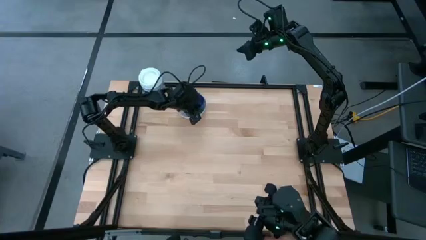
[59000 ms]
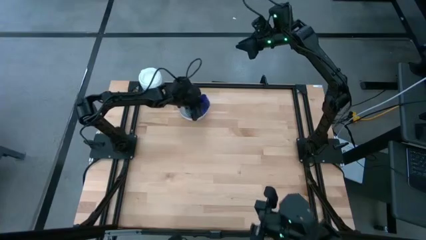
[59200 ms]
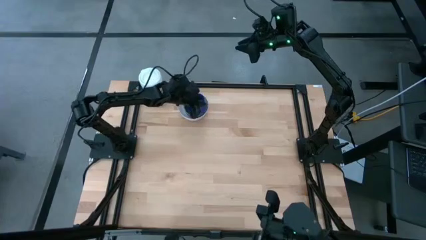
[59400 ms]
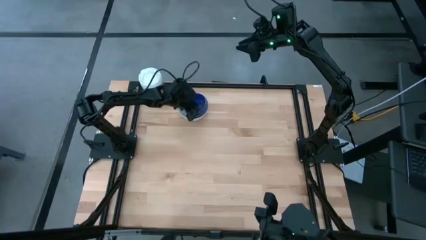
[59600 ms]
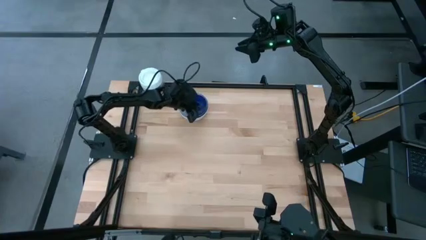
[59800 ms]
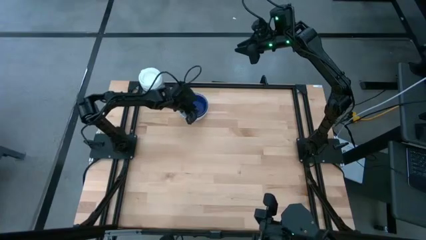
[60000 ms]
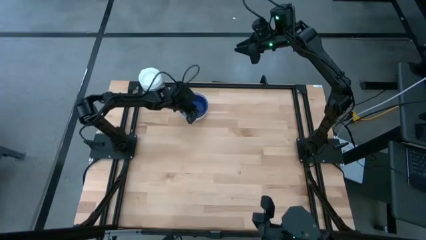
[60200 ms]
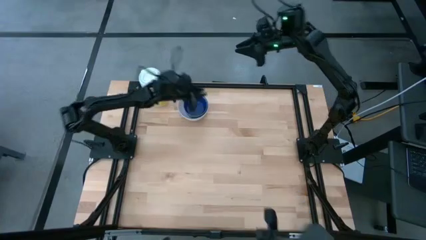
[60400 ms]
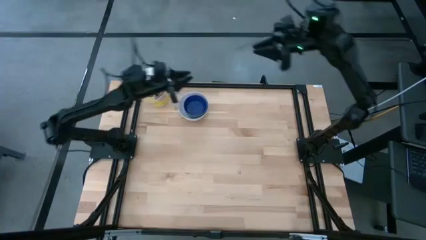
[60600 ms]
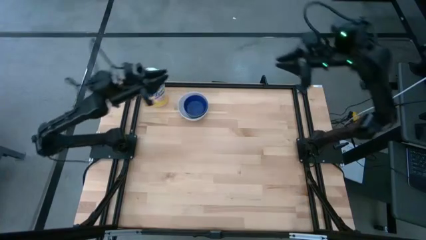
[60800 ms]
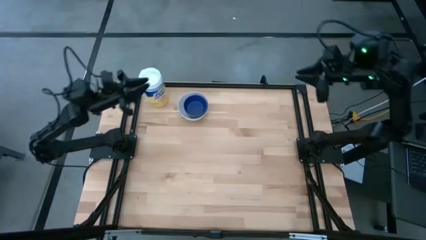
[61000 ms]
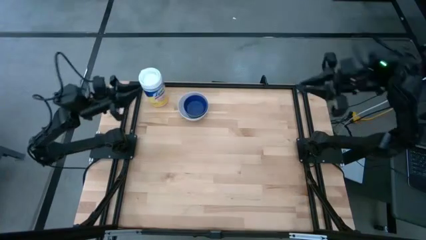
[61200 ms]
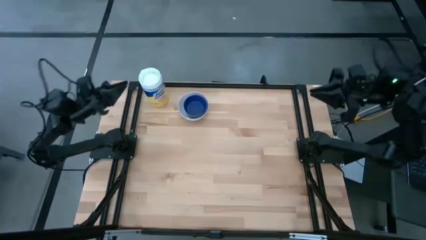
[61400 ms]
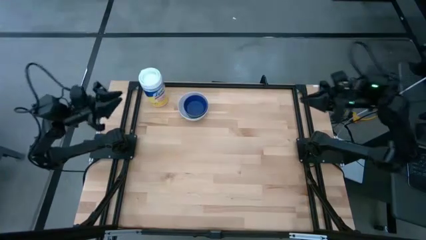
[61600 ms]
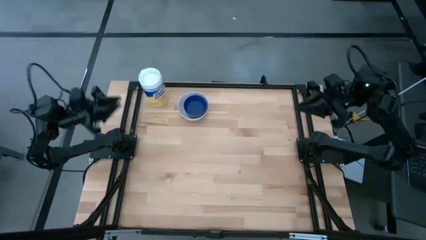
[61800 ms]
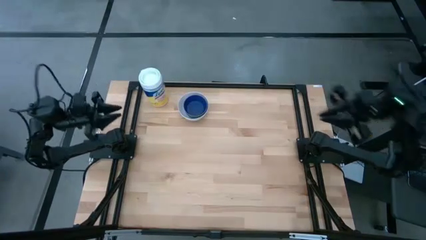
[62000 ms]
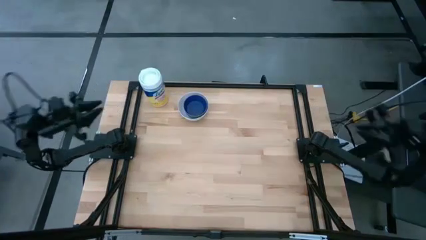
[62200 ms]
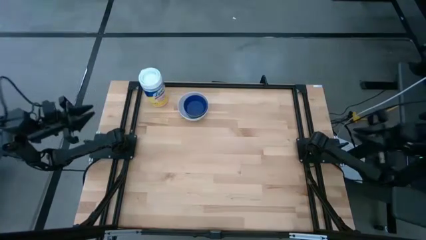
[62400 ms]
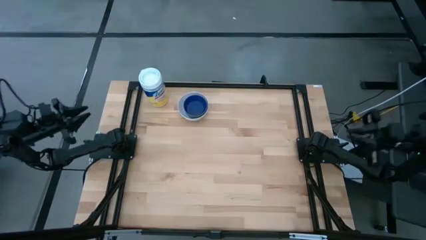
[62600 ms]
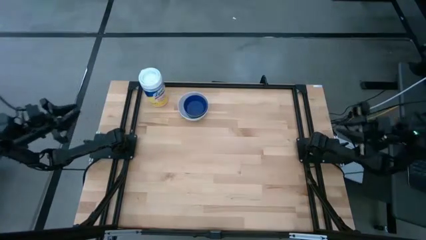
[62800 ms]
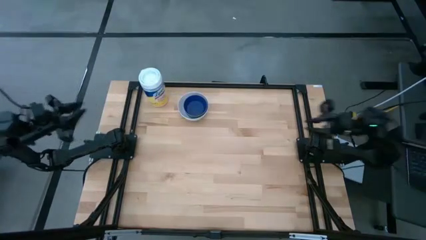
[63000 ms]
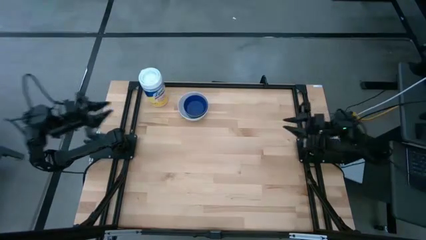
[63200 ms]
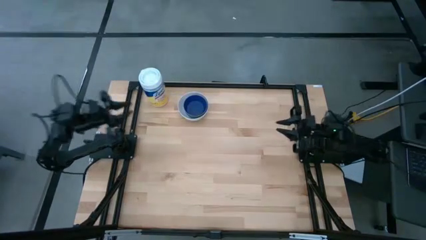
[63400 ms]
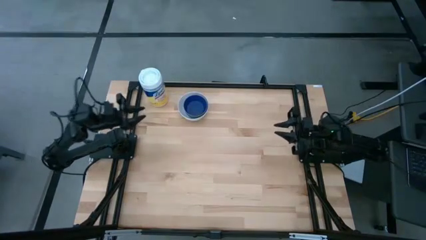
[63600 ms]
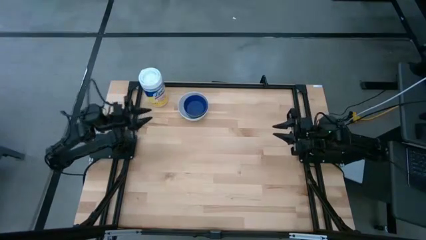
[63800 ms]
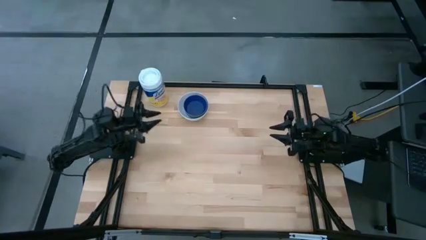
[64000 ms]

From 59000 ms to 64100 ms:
Return to Home Position

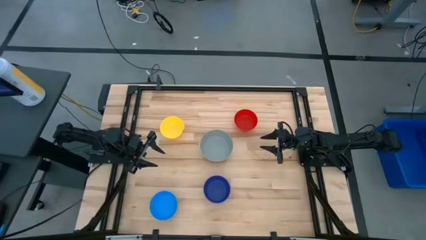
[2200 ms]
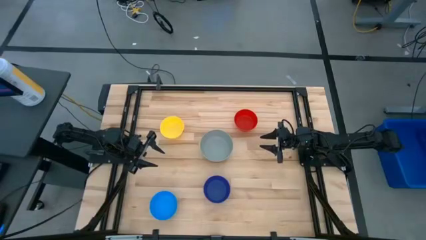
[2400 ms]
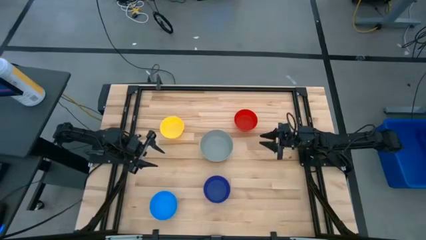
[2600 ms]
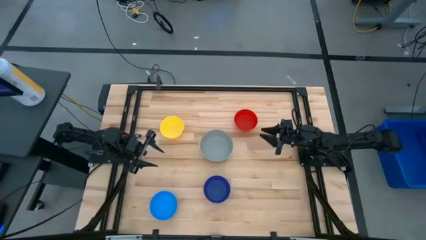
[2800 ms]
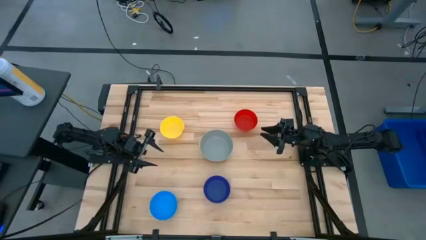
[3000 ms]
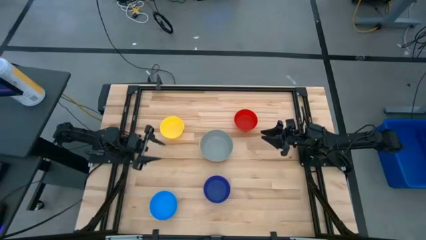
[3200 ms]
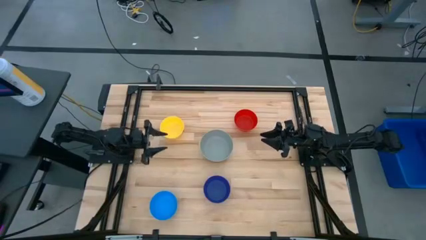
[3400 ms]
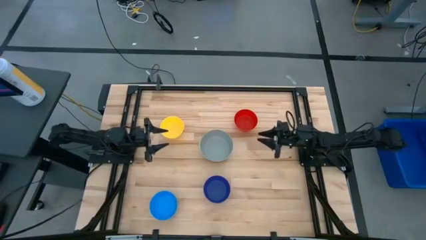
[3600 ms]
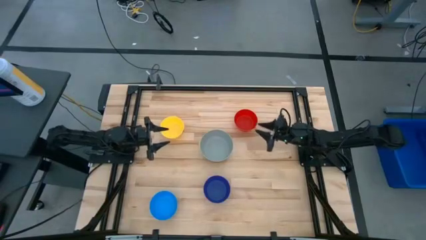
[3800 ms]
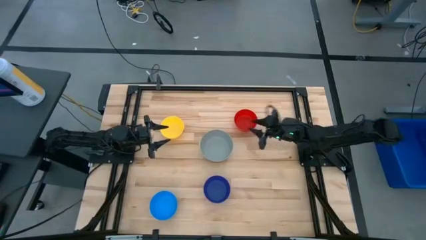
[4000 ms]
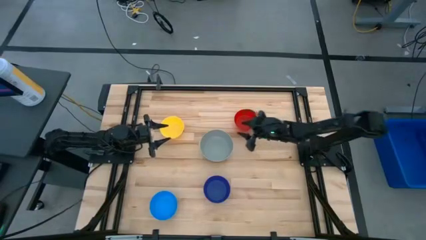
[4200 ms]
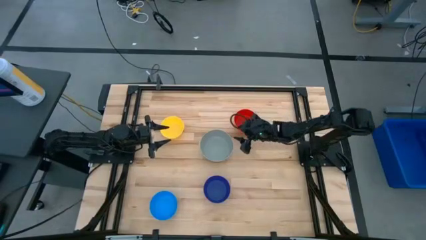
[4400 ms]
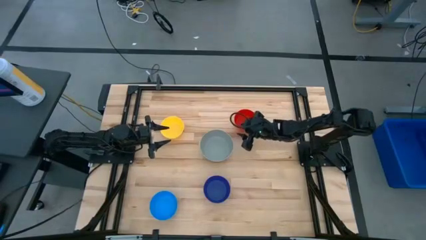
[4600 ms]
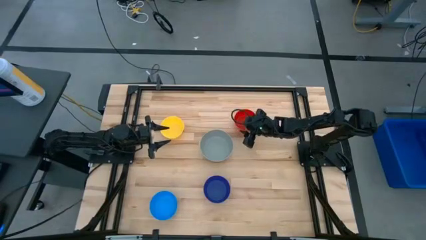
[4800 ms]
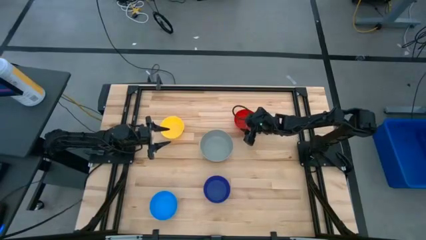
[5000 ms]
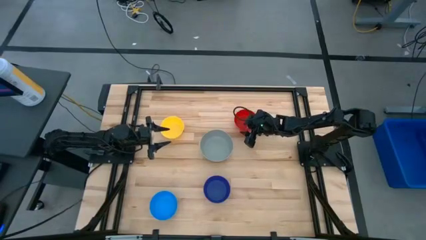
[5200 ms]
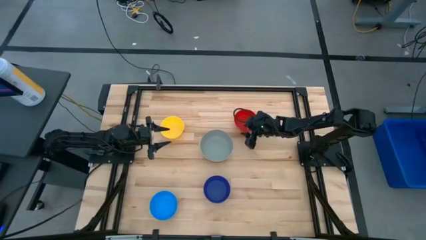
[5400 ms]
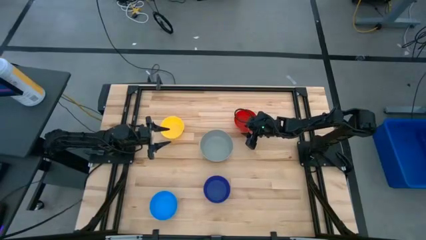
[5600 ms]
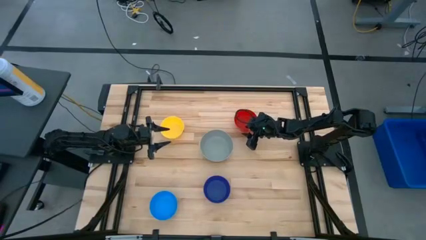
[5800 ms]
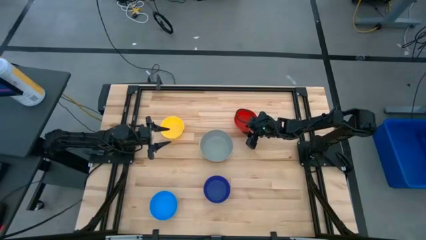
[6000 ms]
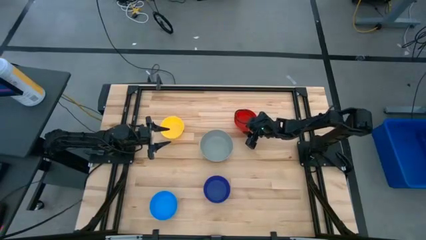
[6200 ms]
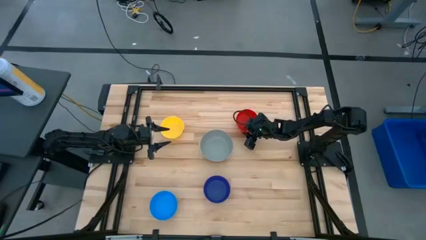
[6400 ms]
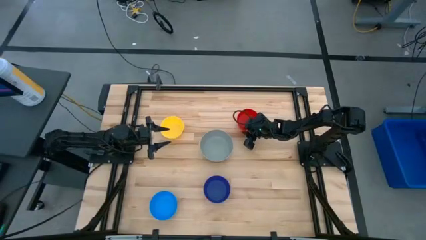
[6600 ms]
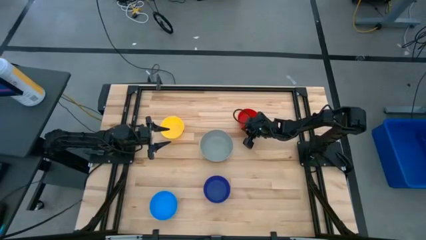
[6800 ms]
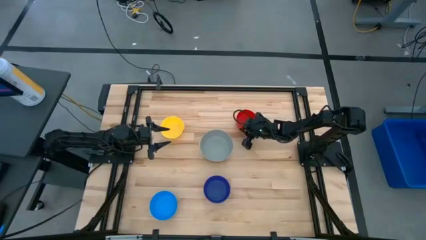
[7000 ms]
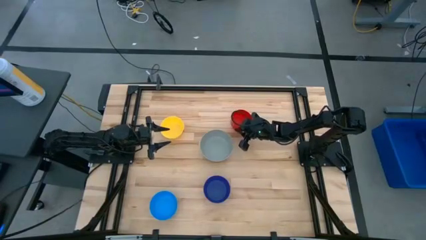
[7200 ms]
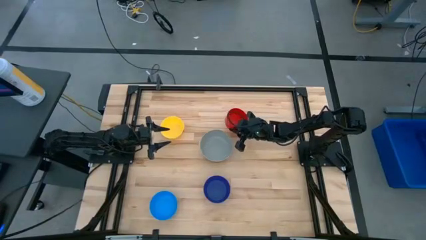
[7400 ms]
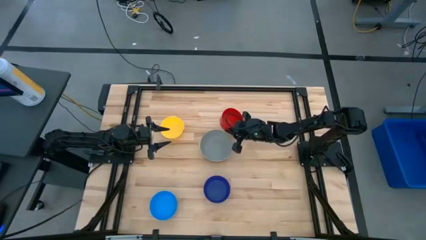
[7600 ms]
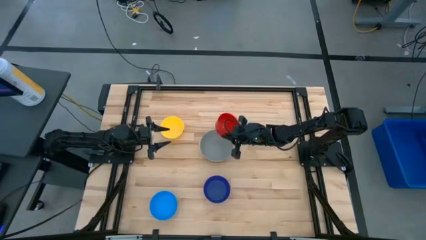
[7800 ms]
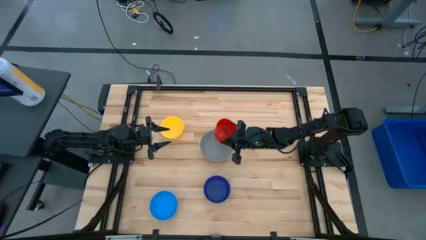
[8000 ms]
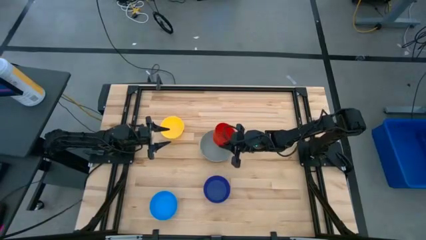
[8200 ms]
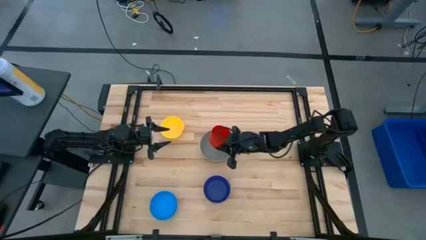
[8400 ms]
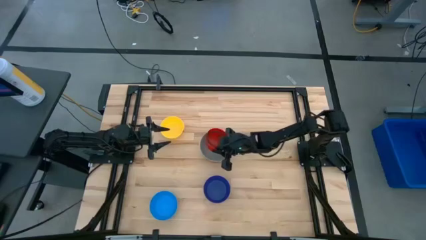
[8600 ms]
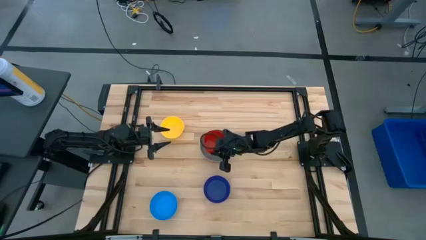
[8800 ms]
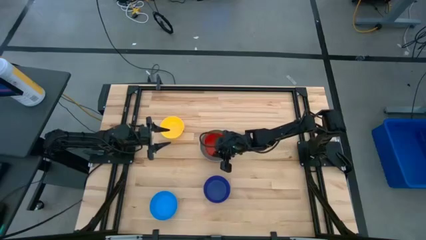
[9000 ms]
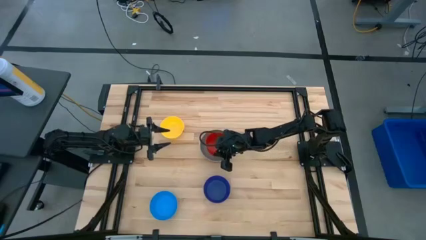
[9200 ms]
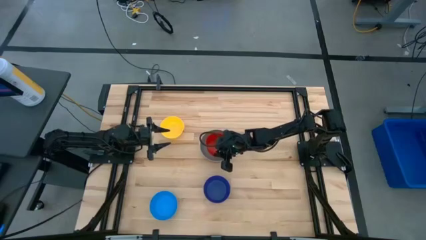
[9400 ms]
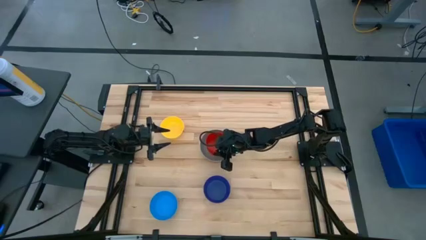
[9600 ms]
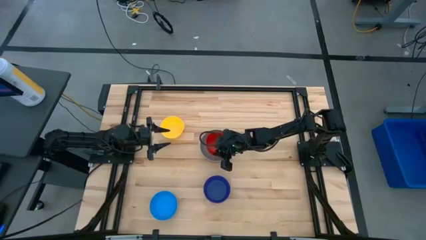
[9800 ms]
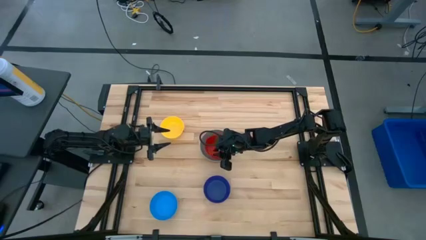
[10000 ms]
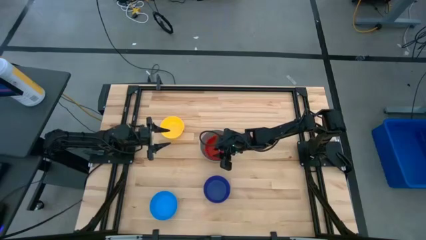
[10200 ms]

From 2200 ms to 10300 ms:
Stack the red bowl on the gray bowl

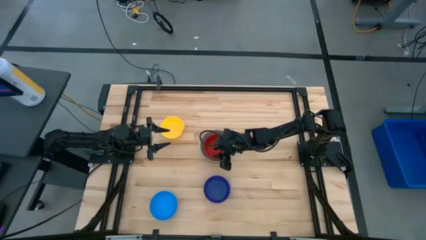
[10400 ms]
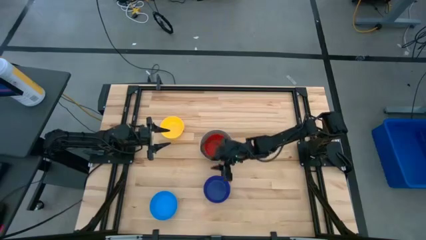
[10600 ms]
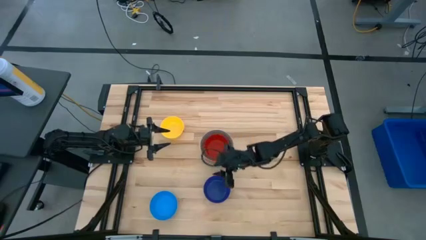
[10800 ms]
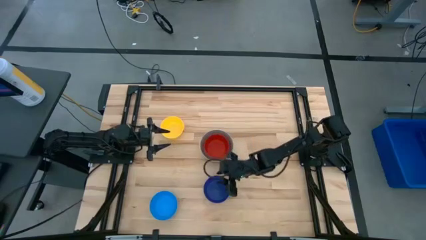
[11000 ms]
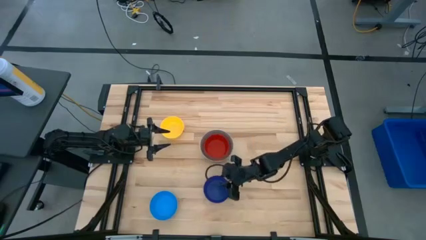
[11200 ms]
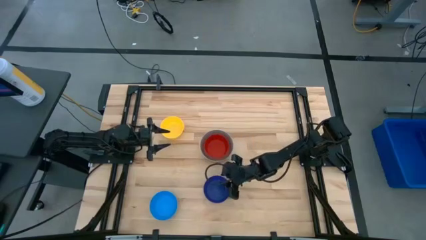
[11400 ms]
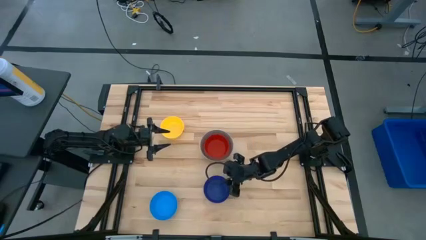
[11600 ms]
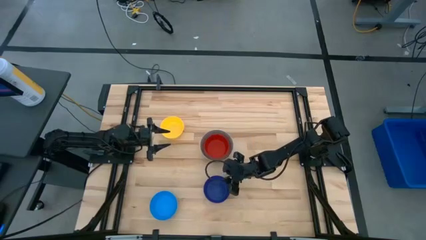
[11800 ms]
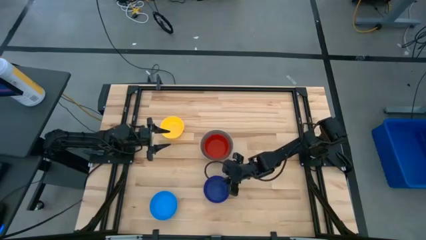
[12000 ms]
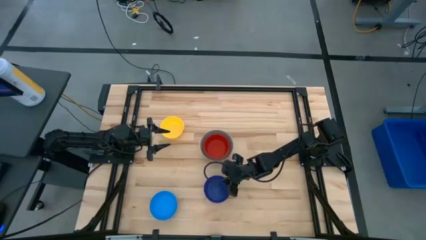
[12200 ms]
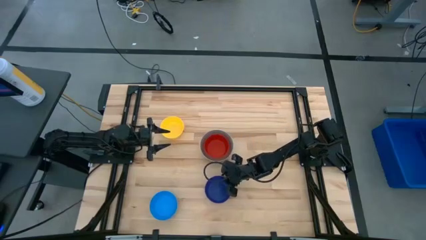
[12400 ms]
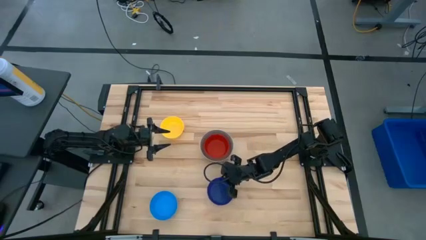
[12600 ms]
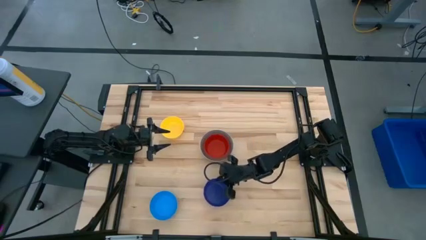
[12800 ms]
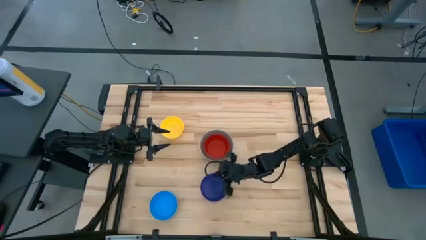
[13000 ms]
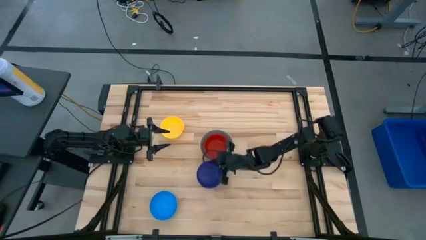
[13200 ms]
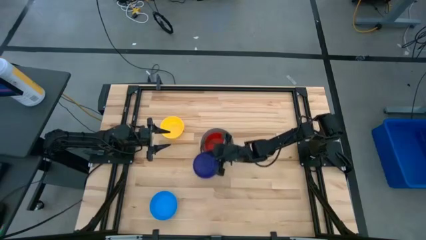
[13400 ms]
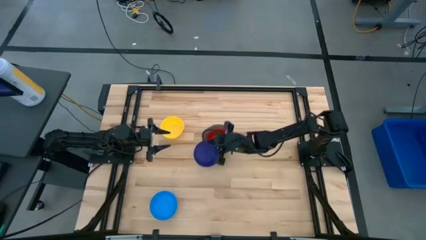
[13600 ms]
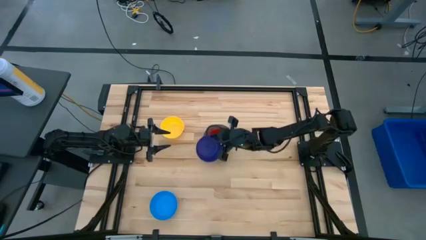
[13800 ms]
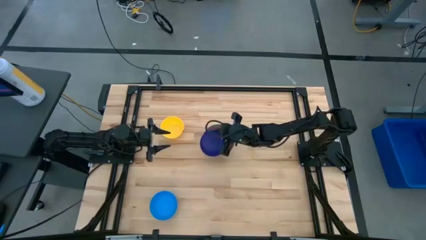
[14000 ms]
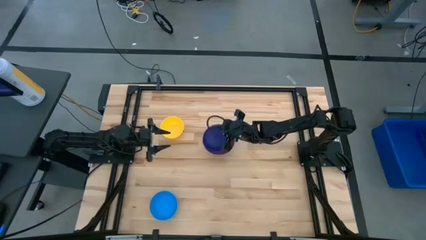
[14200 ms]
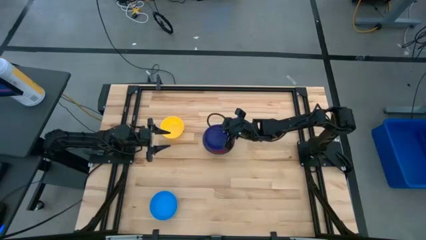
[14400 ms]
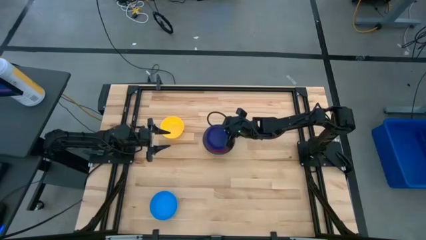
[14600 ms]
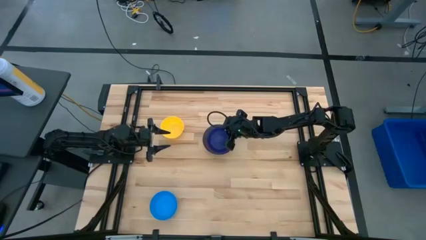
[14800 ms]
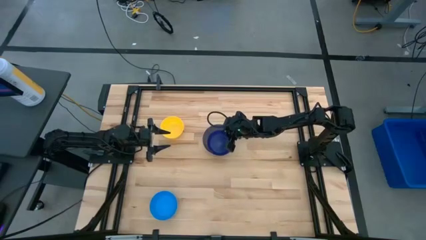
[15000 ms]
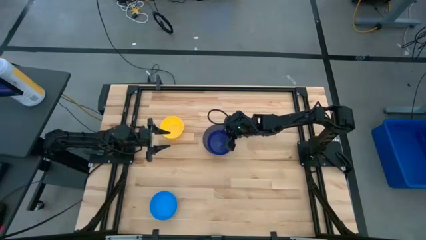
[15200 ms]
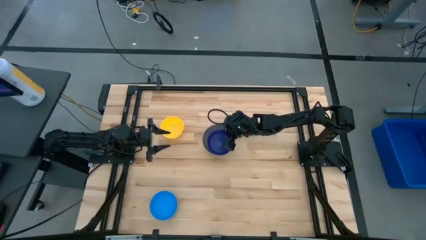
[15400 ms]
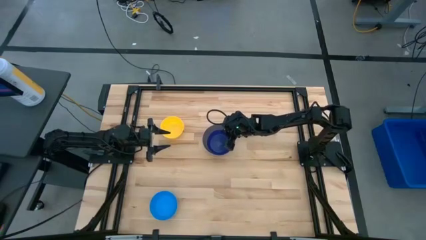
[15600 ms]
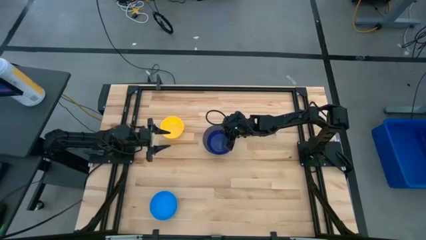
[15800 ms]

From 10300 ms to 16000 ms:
Stack the dark blue bowl on the red bowl
